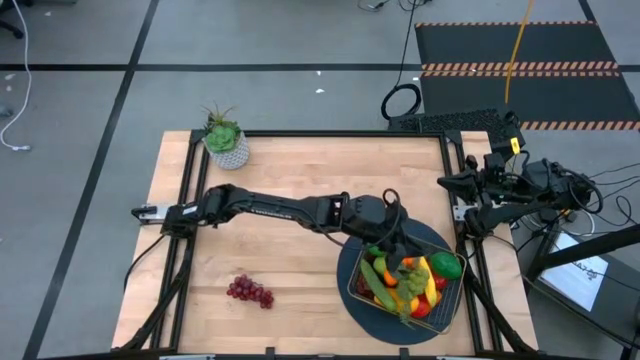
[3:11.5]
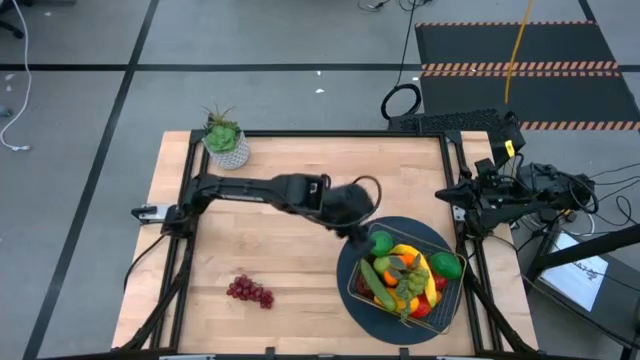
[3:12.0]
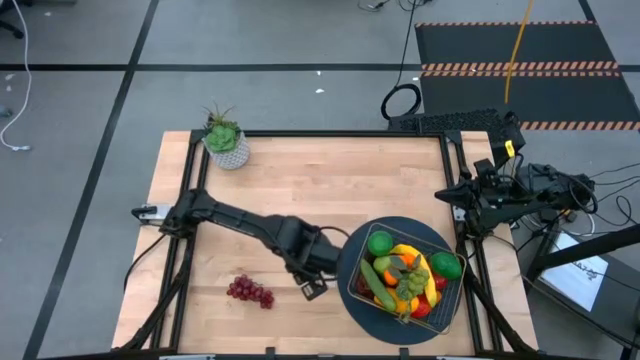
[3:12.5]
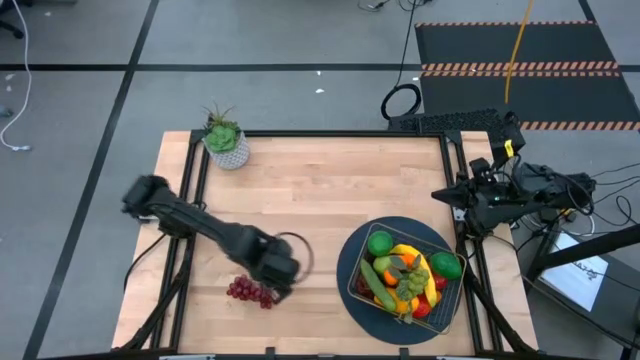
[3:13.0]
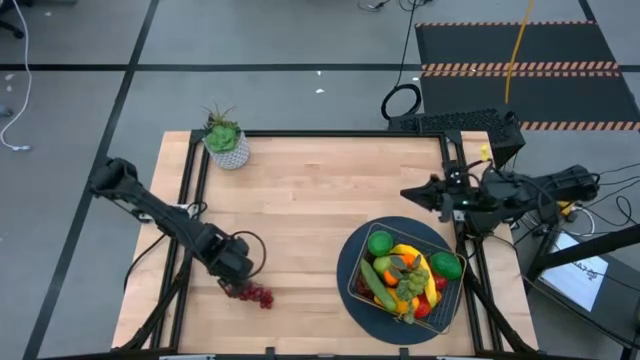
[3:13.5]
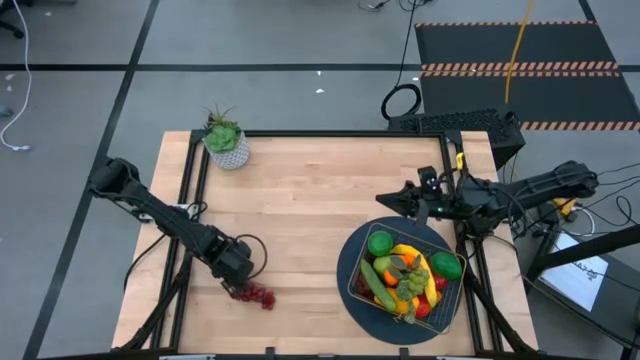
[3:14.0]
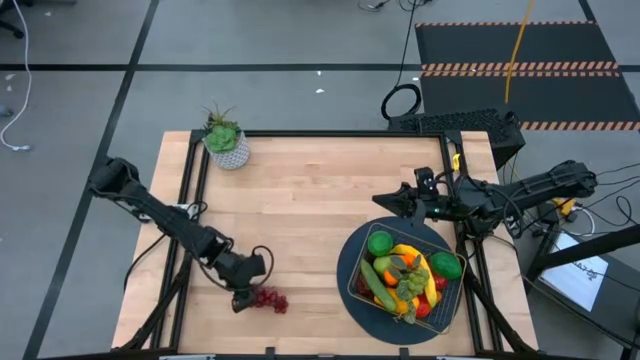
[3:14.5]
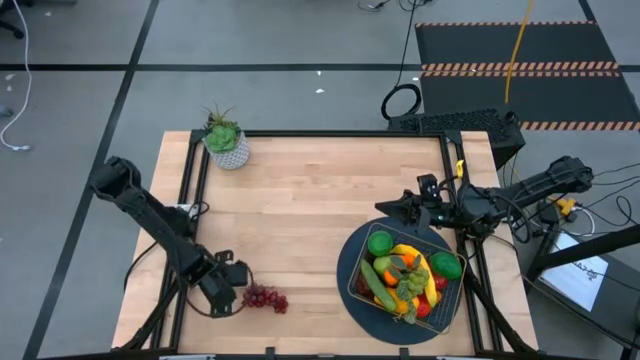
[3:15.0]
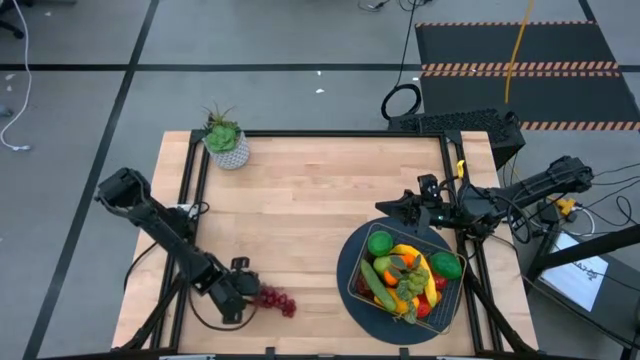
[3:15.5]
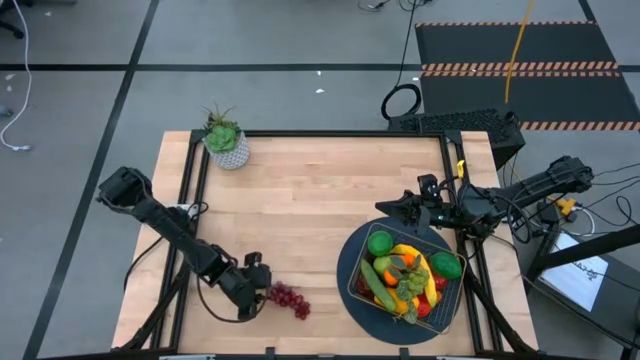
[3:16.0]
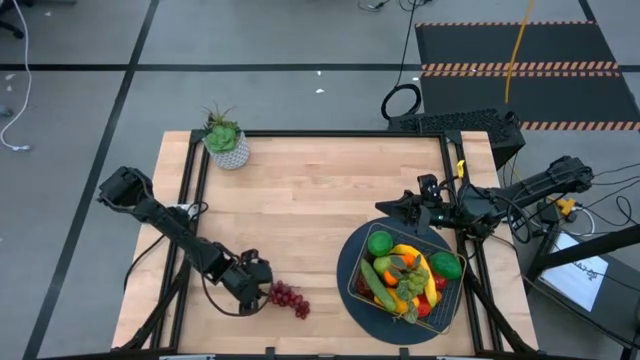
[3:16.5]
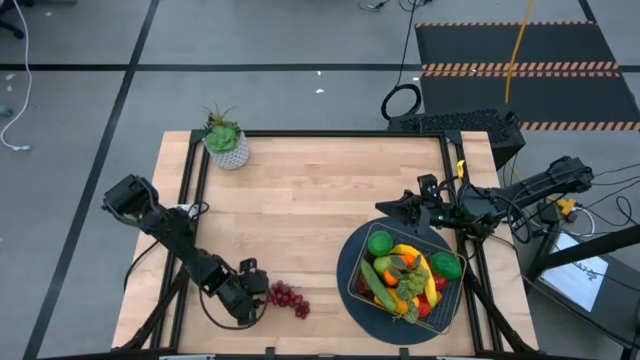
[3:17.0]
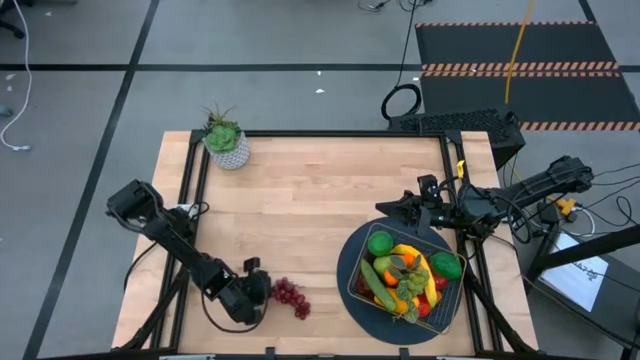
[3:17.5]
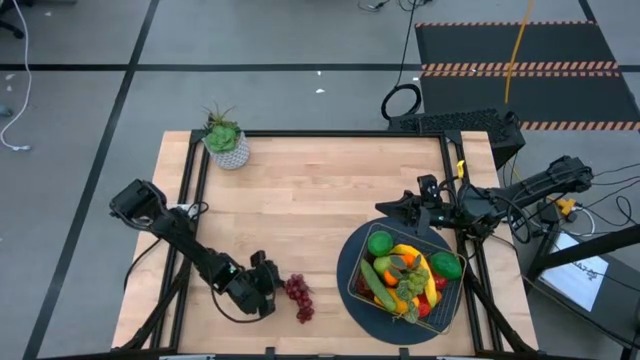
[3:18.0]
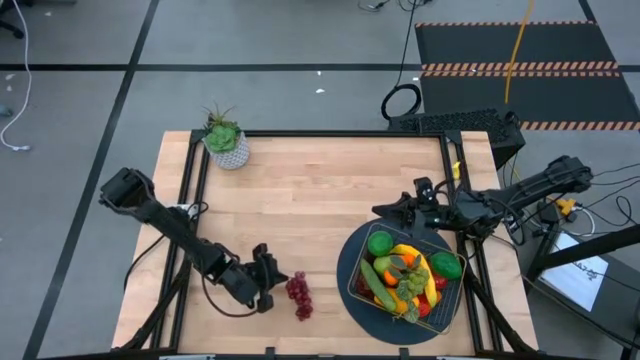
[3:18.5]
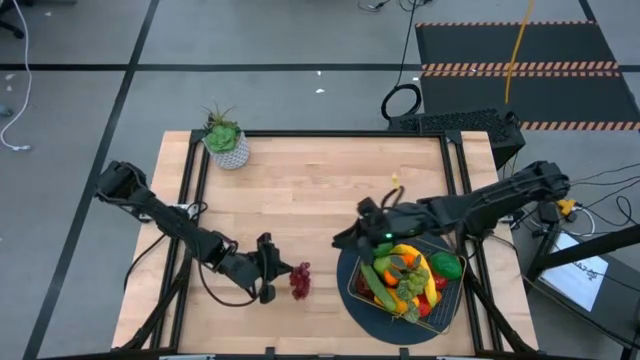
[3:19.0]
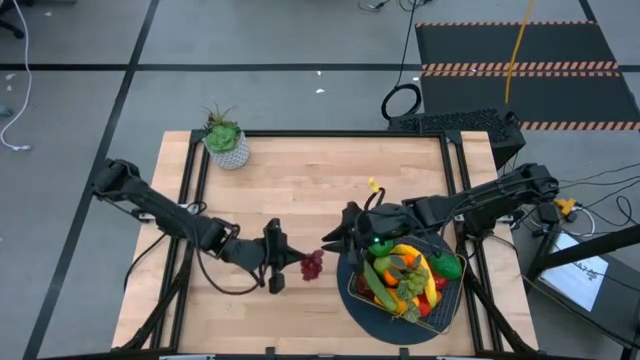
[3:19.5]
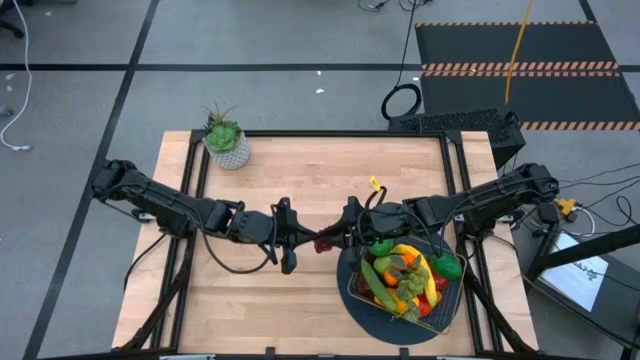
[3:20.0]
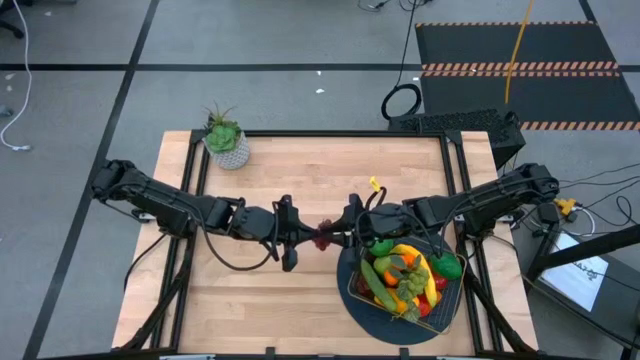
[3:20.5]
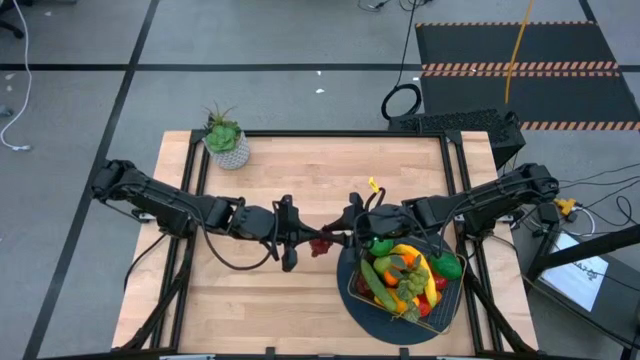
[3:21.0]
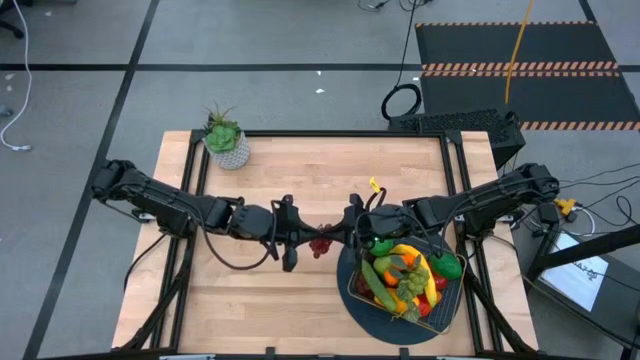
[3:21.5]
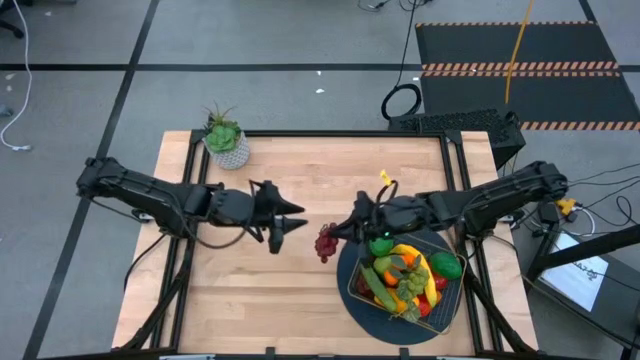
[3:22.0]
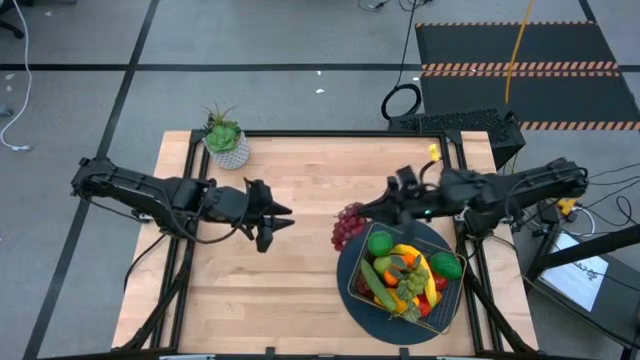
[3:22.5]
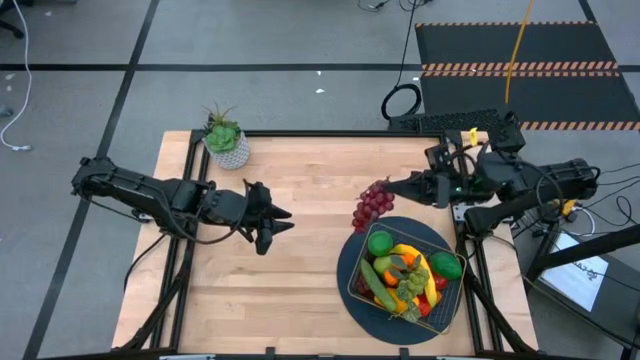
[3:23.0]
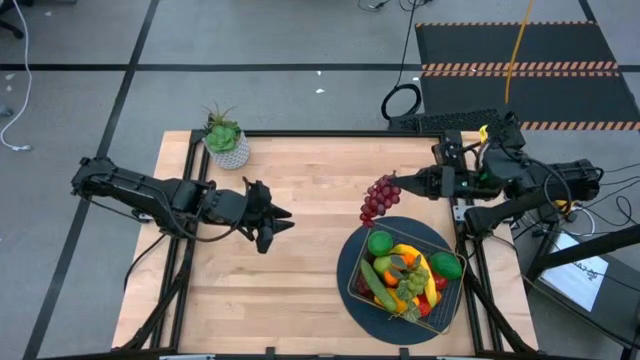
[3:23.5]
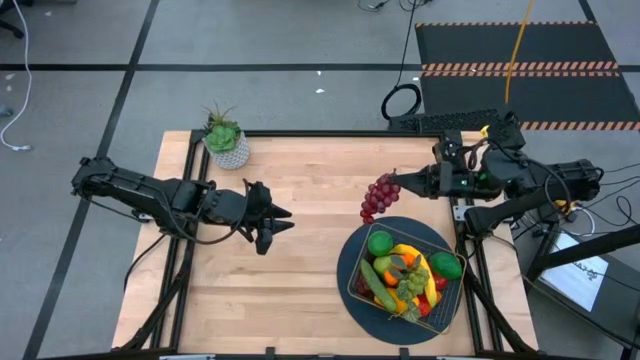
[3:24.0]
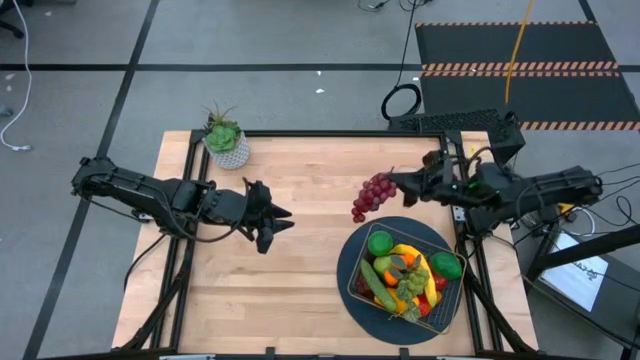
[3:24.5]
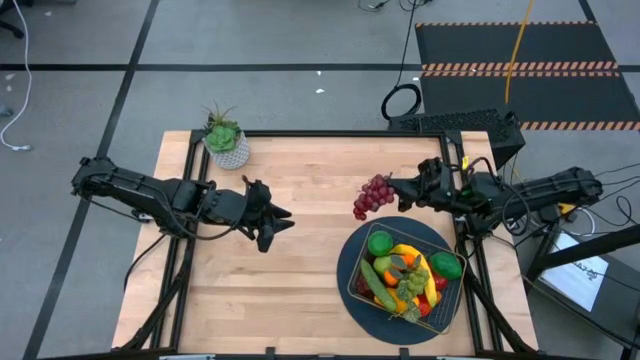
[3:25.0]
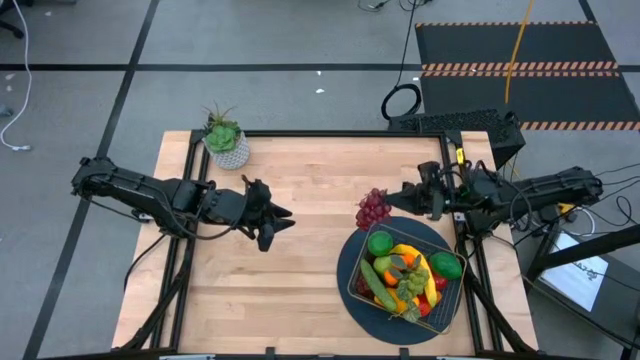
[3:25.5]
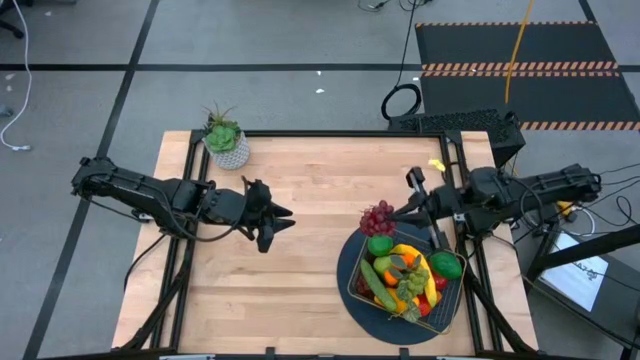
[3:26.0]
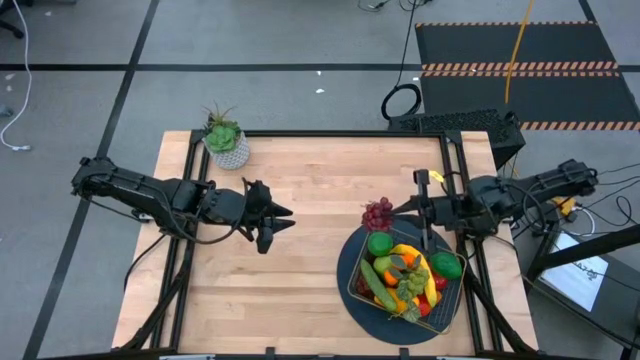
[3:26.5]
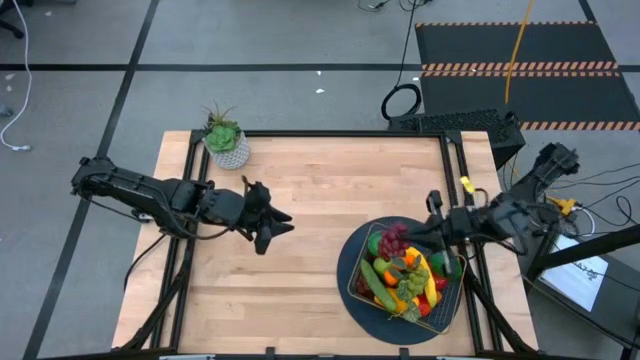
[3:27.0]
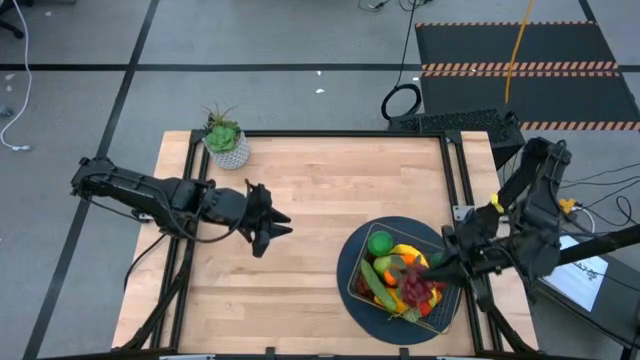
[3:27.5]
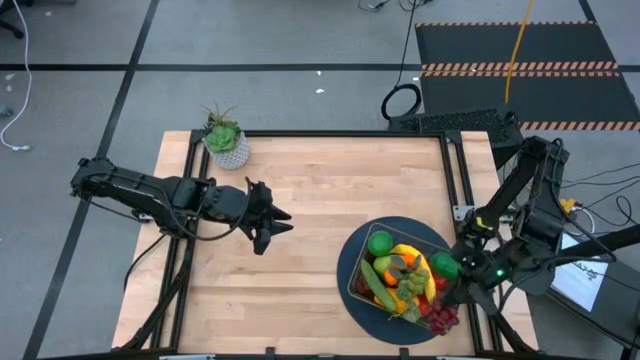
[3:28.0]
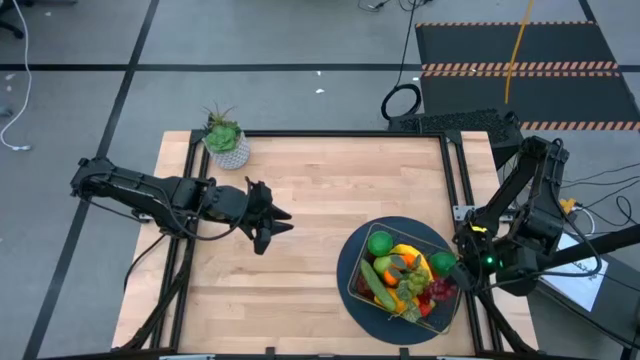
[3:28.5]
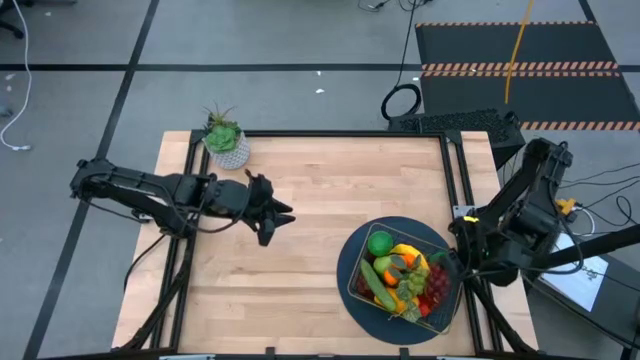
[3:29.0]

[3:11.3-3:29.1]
Task: Build produce basket
Put the grapes into the gold wire basket

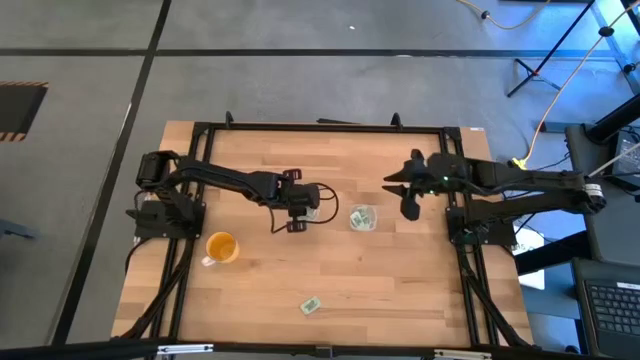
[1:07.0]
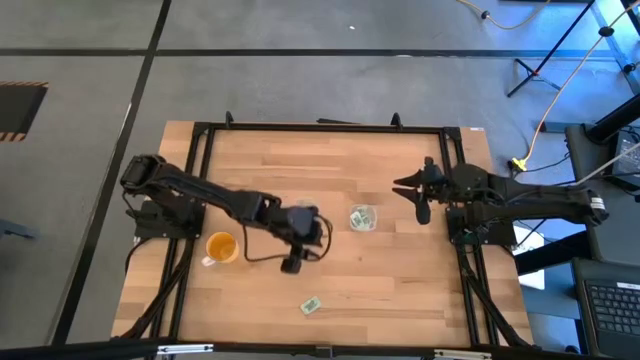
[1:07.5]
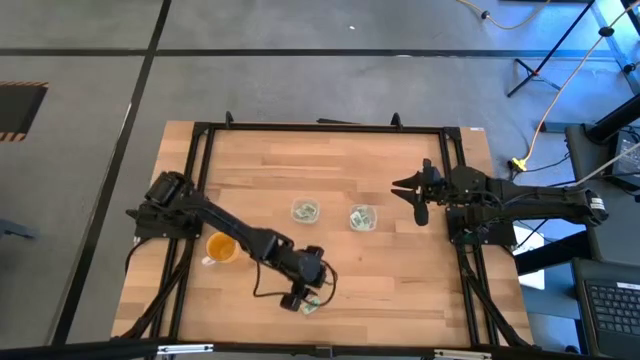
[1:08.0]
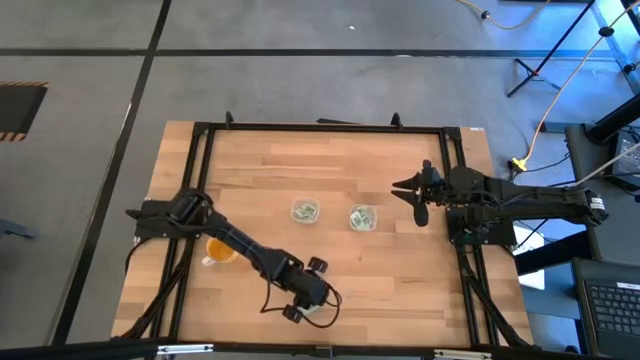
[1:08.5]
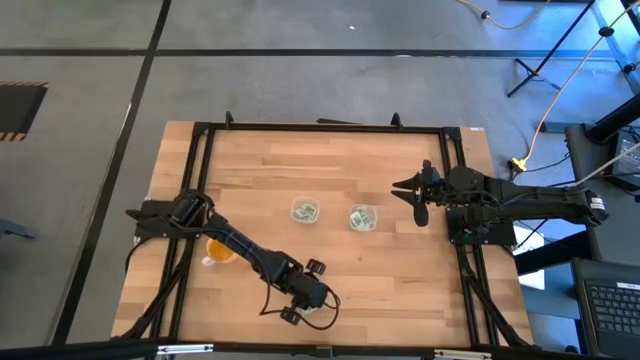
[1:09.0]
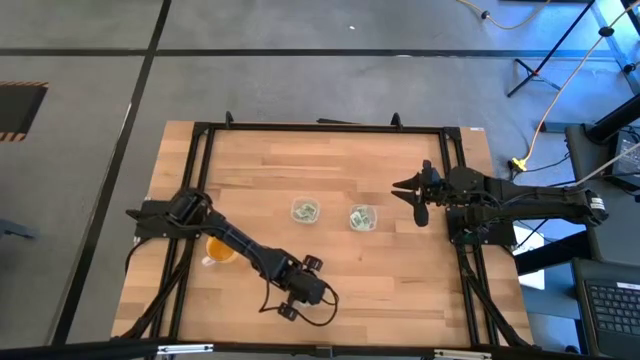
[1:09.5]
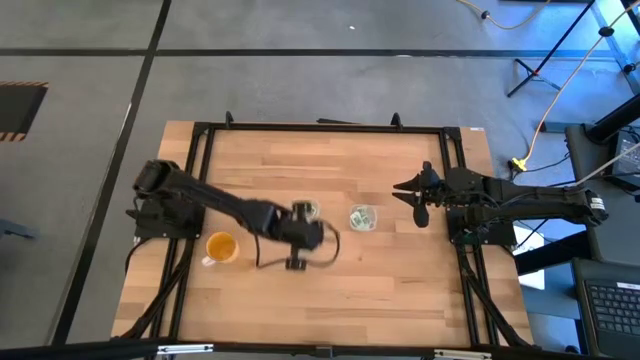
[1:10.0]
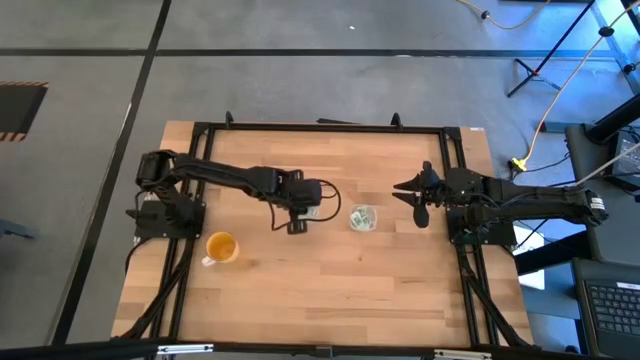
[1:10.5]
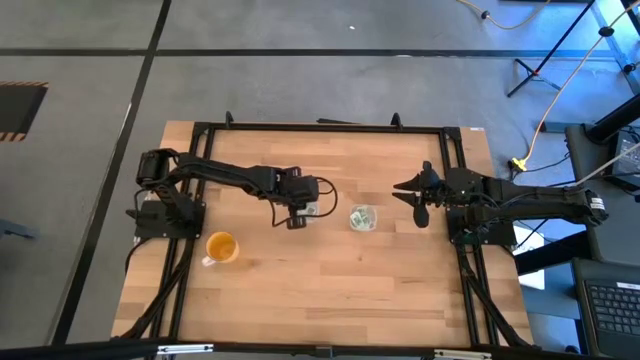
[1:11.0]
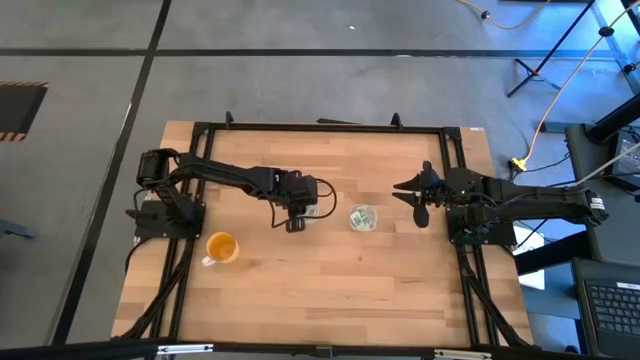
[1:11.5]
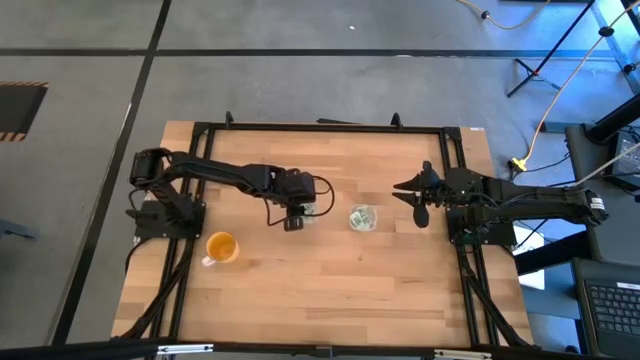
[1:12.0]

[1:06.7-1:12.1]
Task: Pick and place Stevia / Truvia into bins
Put the stevia packet into the left transparent container
